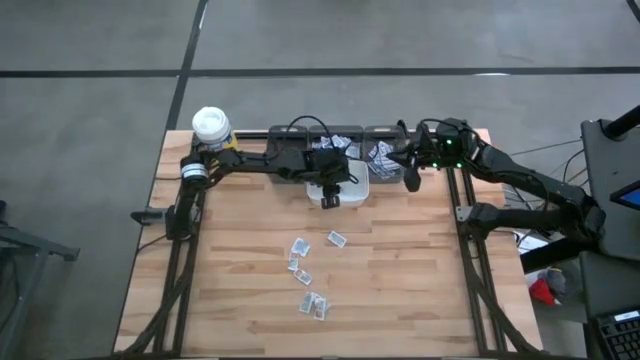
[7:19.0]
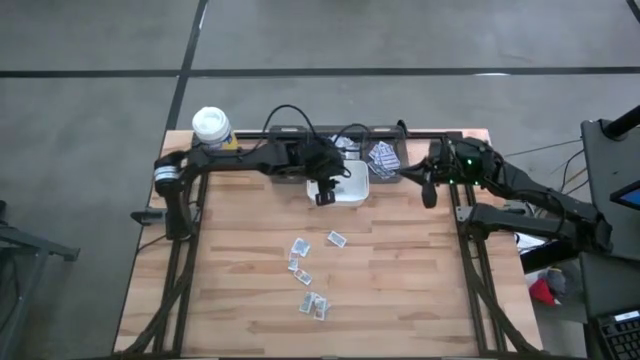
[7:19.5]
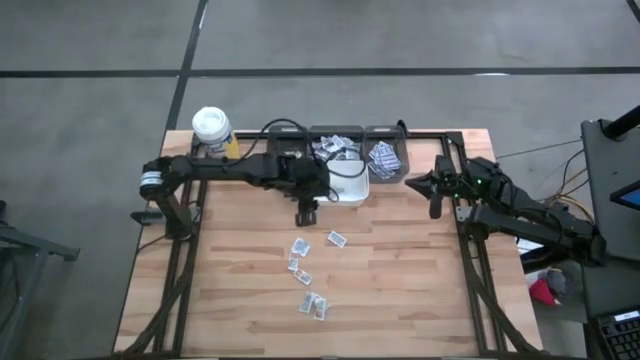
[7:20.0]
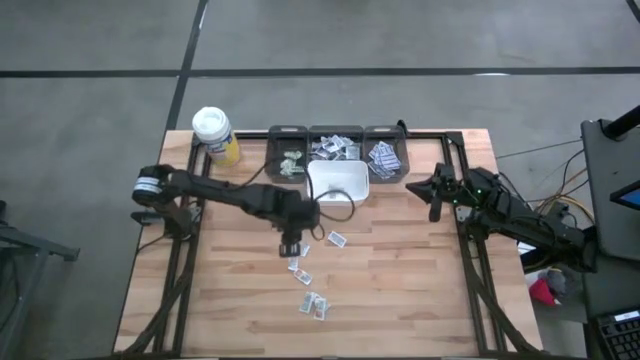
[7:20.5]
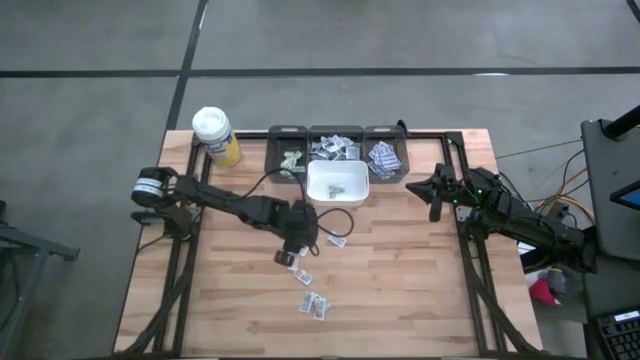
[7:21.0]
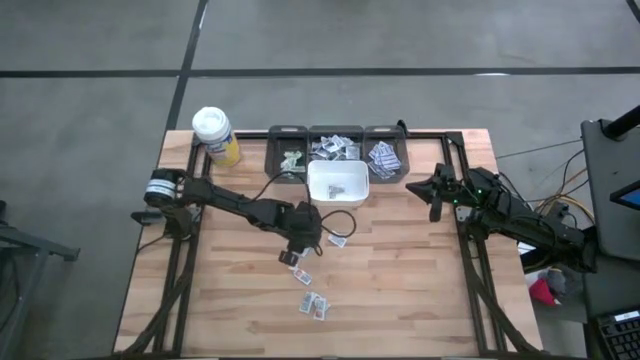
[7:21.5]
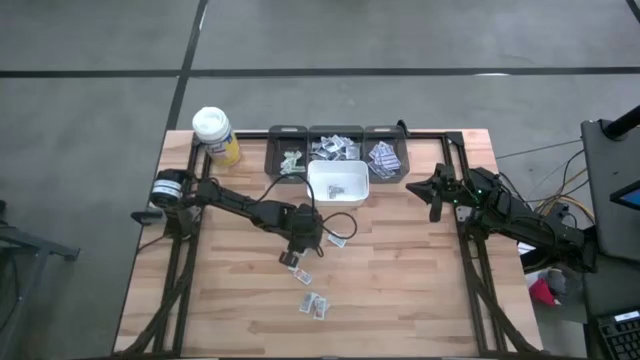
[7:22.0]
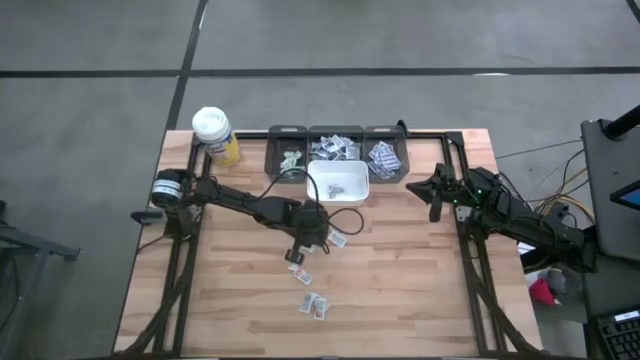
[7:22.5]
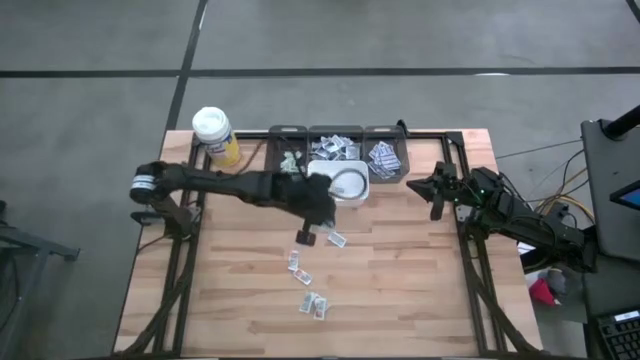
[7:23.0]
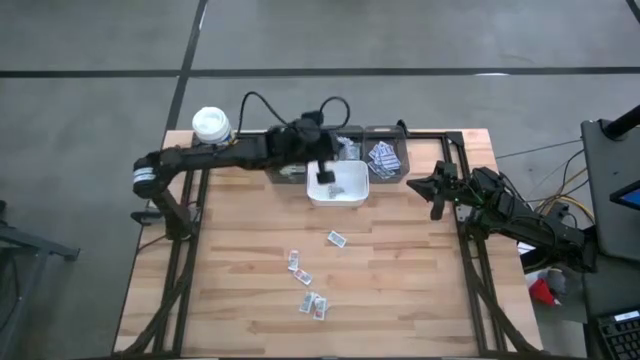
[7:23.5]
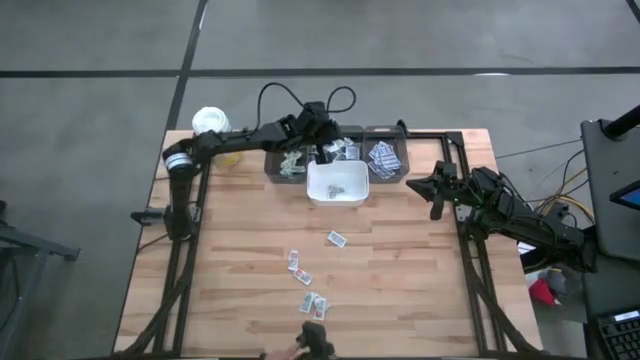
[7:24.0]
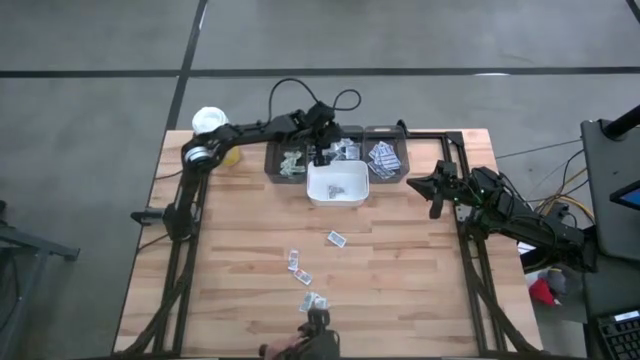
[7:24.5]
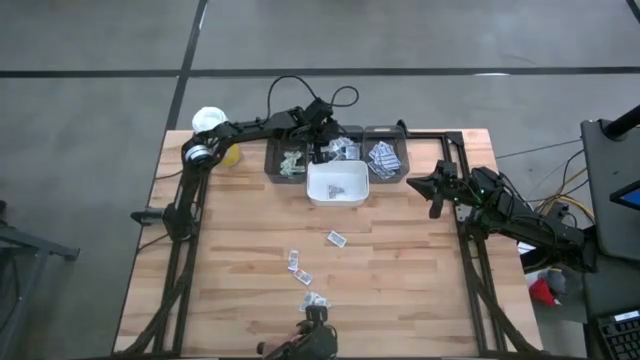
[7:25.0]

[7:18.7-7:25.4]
Task: Pick & Place First Aid Supplies
Put the alcohol pad into the middle black bin

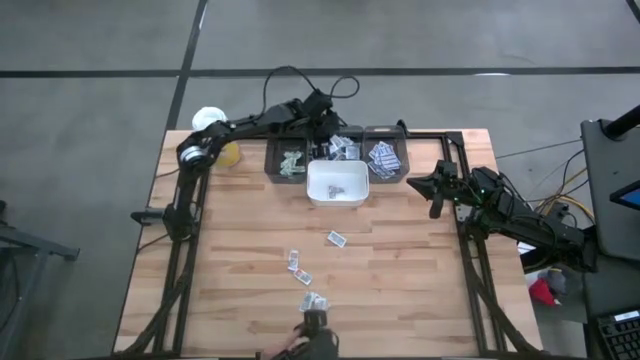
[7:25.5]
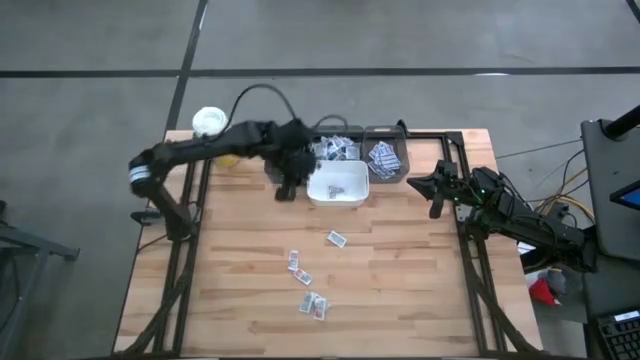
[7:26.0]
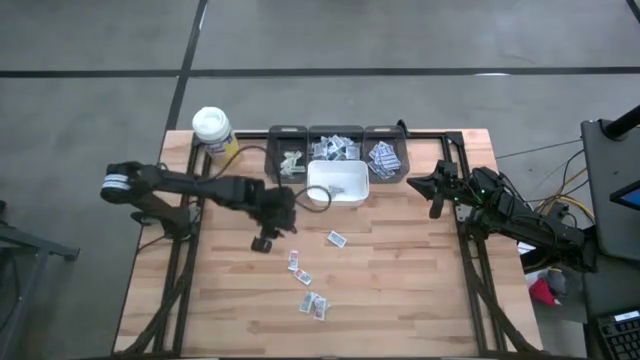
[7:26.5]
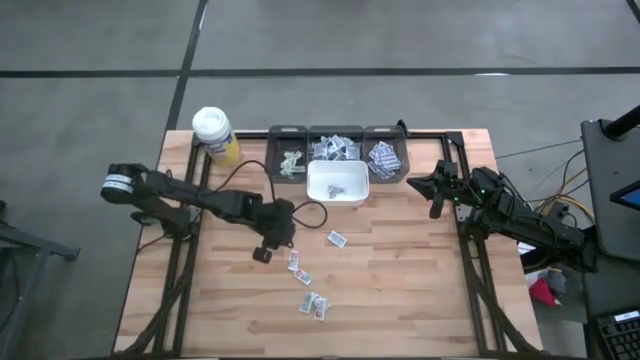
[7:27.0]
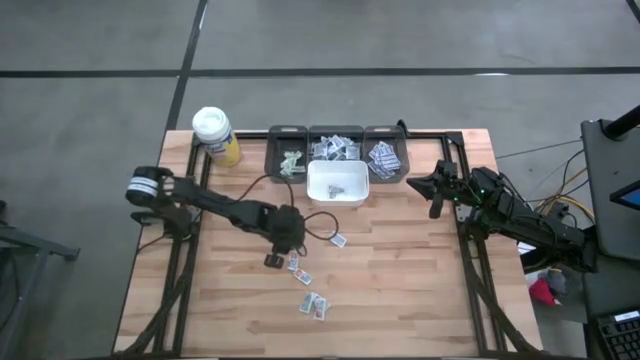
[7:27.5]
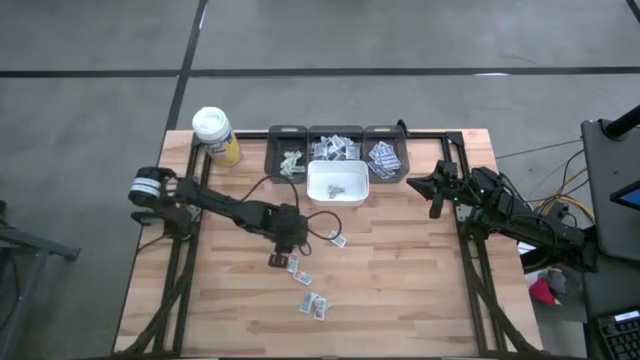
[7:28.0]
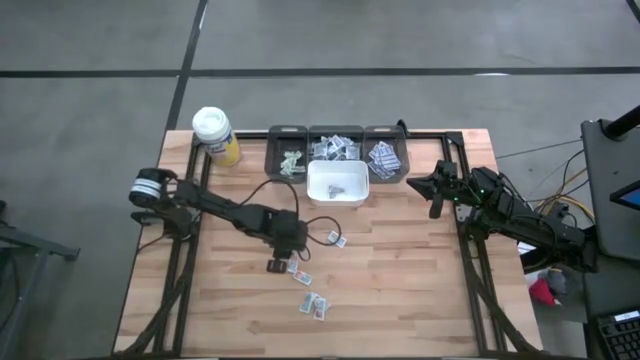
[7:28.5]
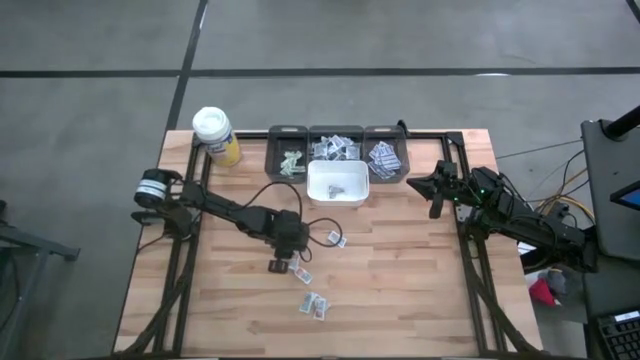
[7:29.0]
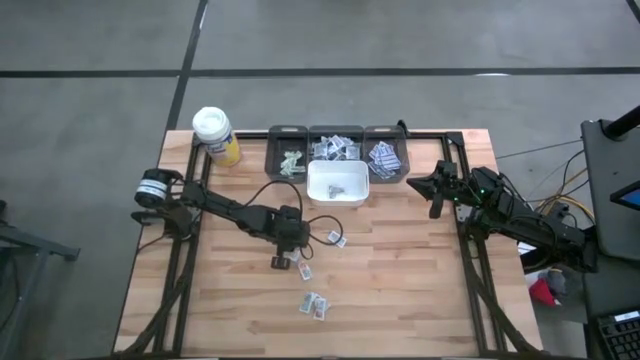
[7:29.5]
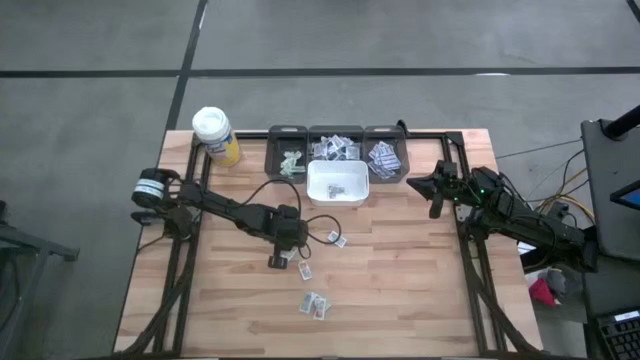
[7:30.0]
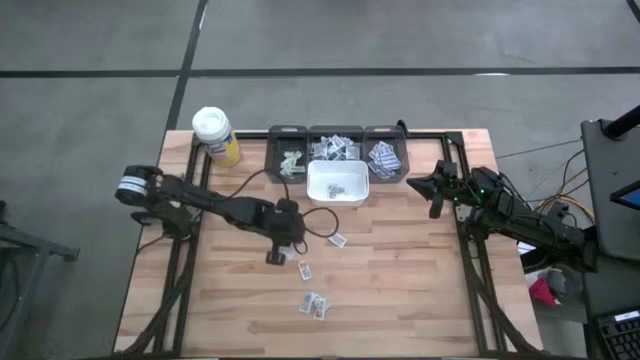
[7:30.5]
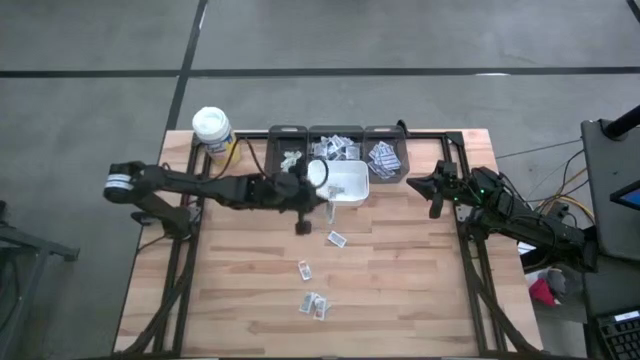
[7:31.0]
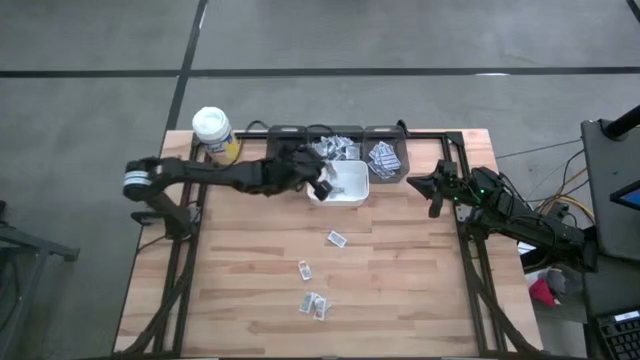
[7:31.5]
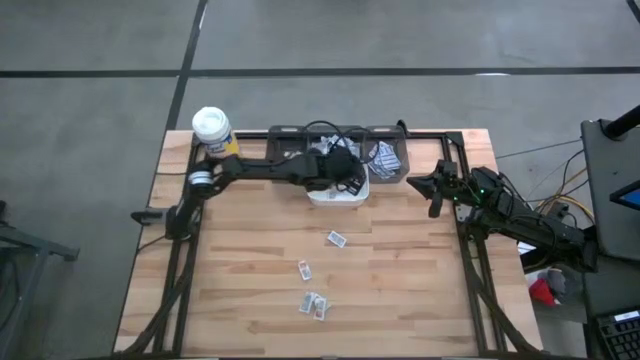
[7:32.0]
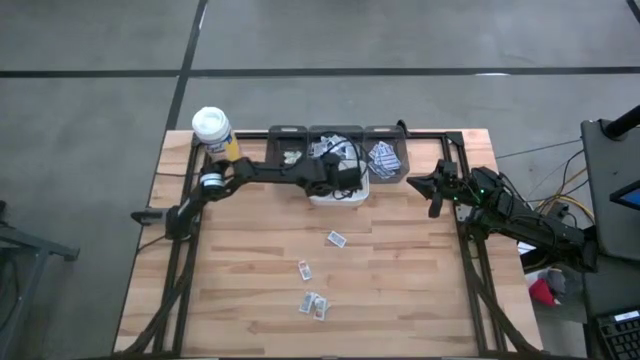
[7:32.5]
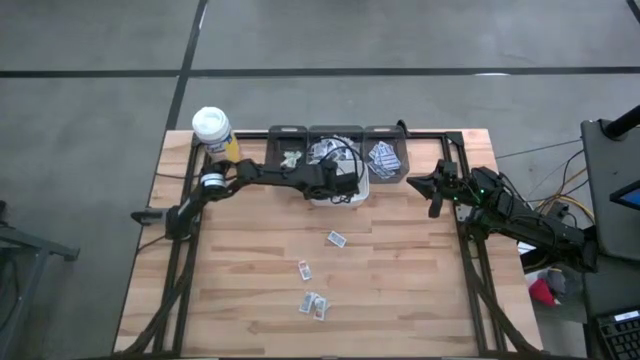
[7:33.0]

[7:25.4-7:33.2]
Put the ointment pack into the white bin

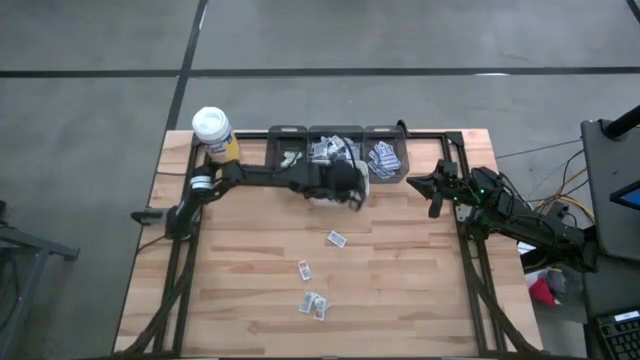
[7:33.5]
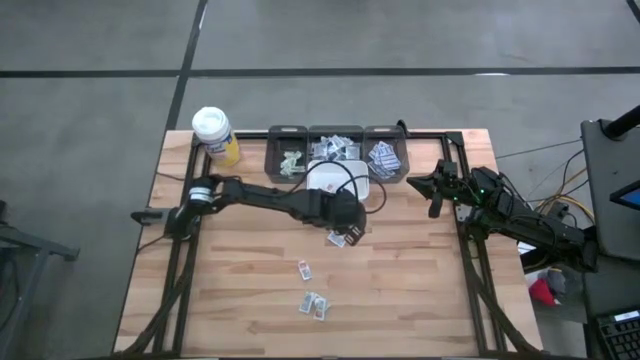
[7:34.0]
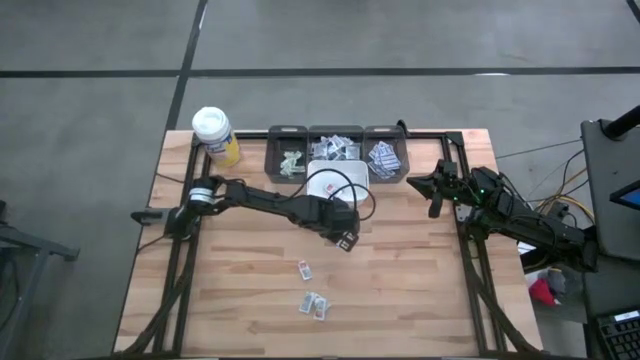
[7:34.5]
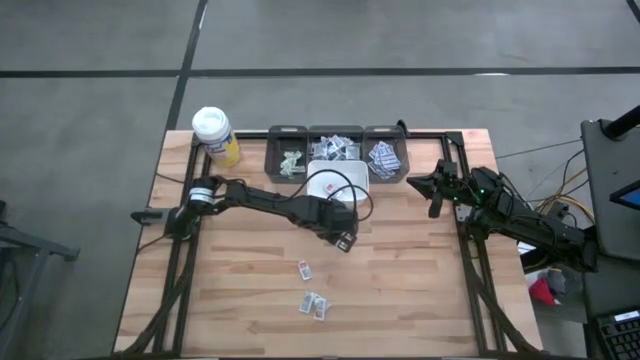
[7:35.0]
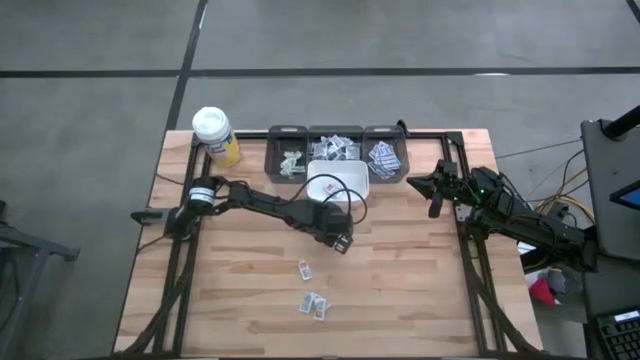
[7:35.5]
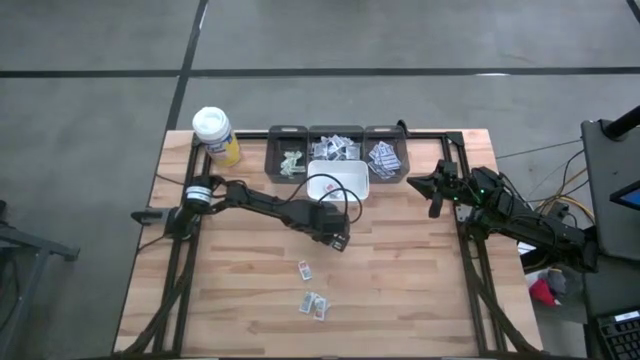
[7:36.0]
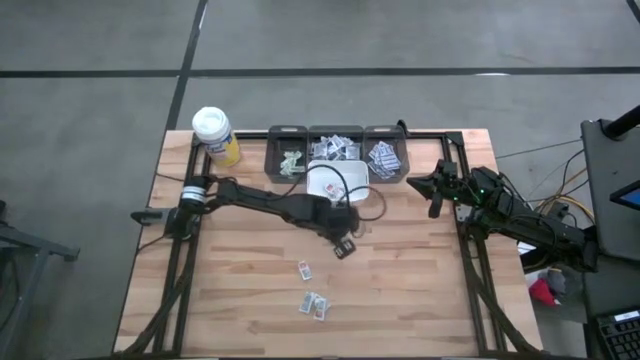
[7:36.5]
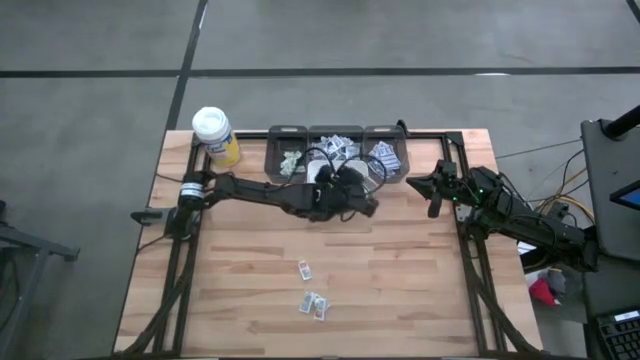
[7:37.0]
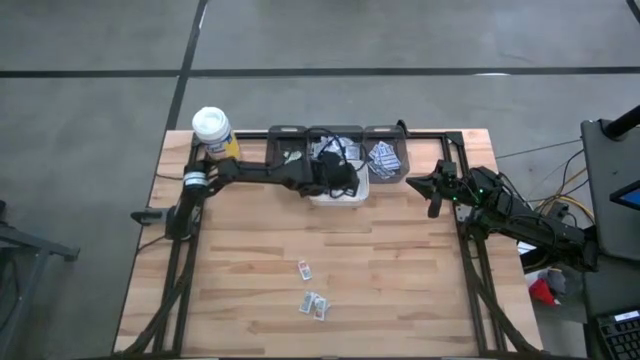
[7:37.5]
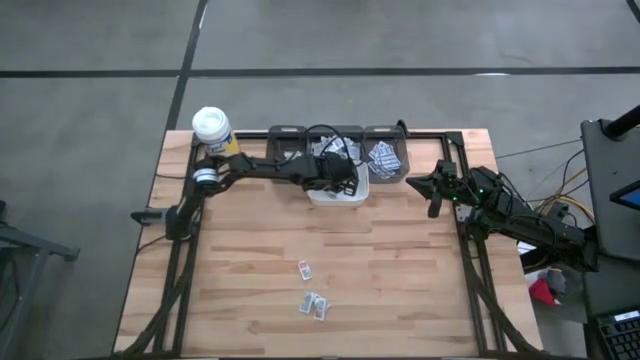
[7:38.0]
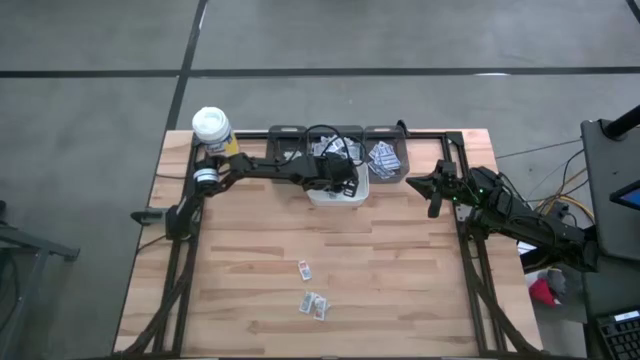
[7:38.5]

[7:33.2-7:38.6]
Put the ointment pack into the white bin
